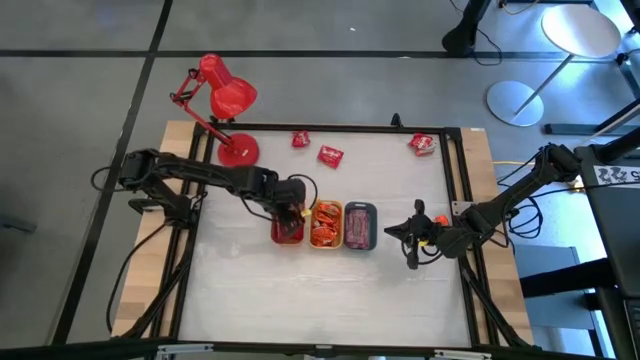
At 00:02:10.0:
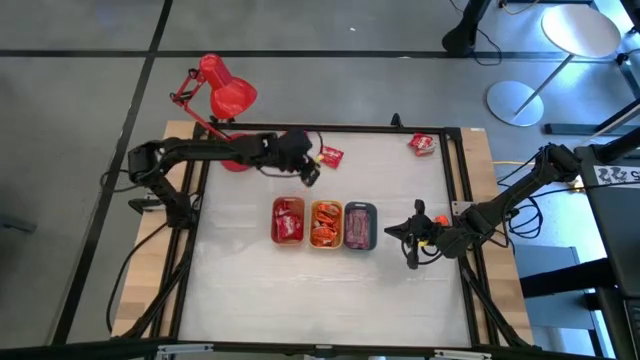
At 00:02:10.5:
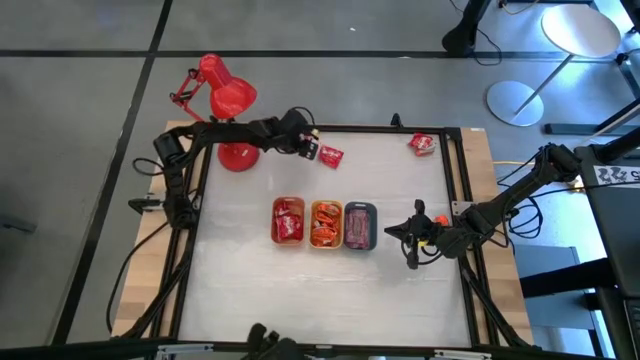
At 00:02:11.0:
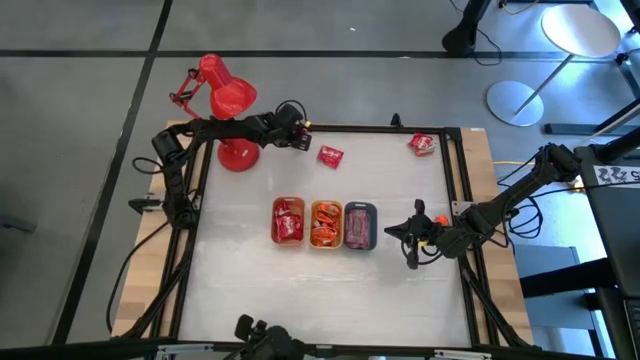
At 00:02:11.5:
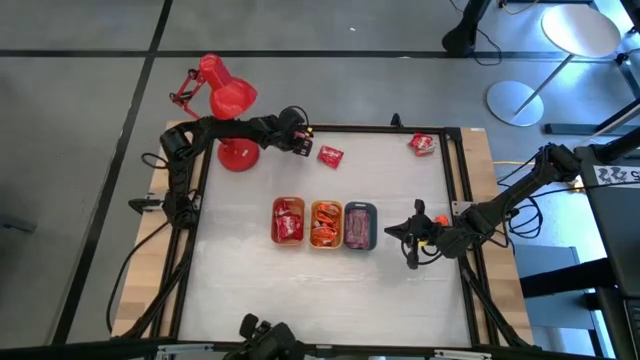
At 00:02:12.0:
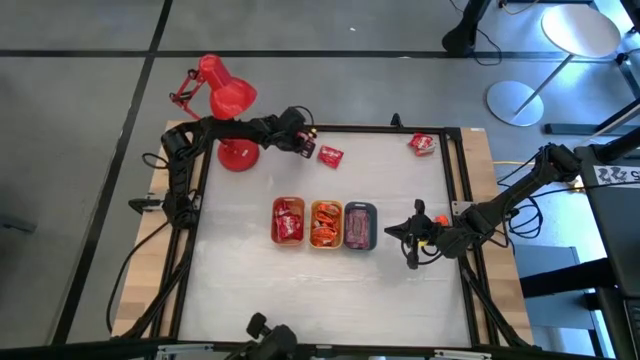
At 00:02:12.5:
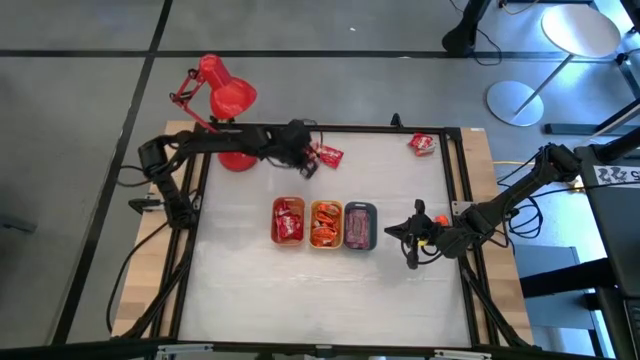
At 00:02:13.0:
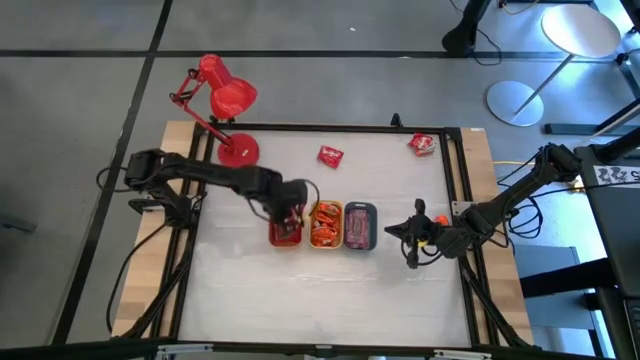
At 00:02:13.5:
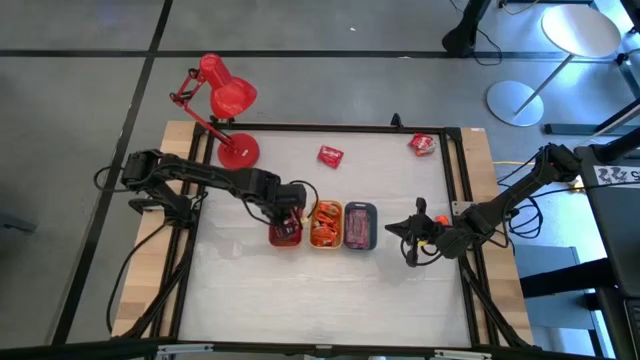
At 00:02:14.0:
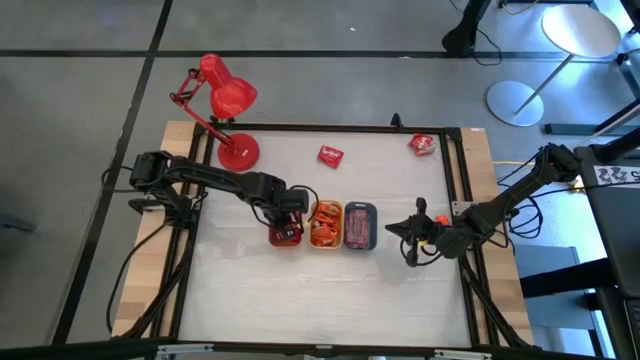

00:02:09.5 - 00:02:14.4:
Task: Sort candy
Put the red candy into the orange bin

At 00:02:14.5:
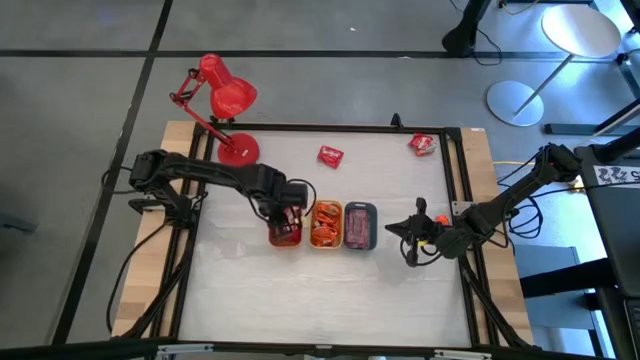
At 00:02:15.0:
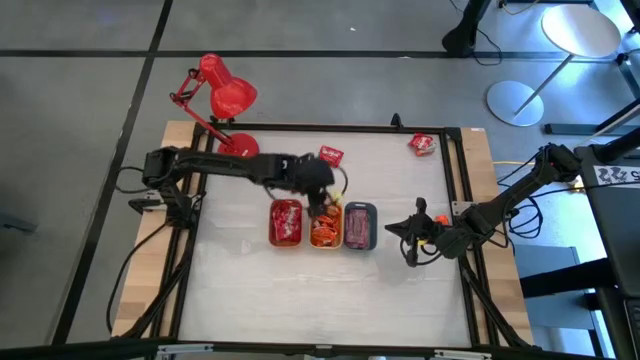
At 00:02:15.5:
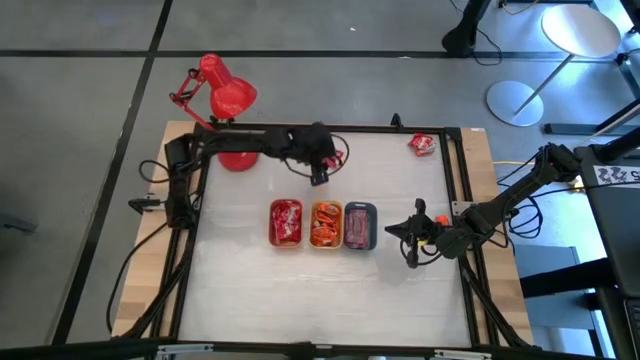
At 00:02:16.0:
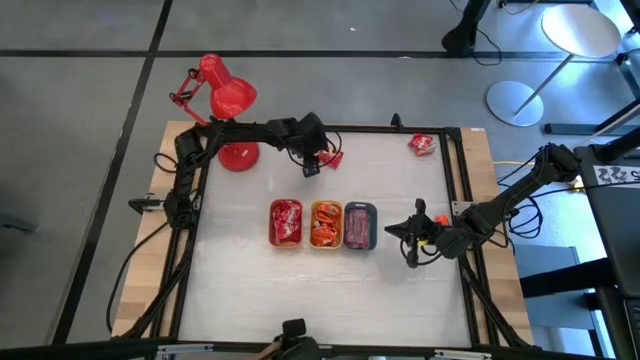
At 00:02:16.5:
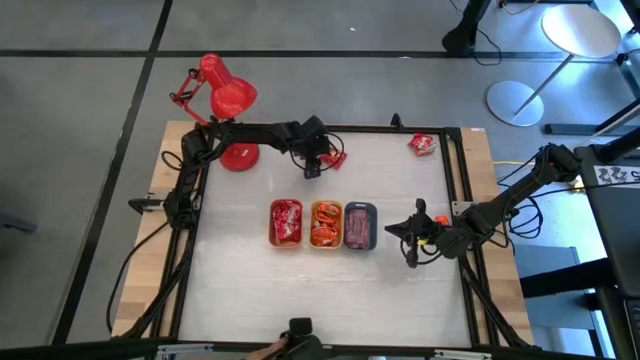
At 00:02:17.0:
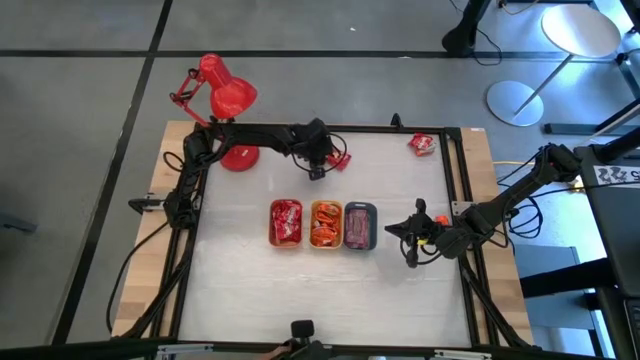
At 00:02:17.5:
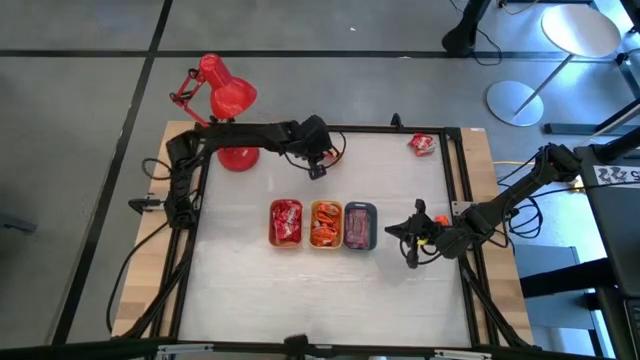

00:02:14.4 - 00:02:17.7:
Put the red candy into the orange bin

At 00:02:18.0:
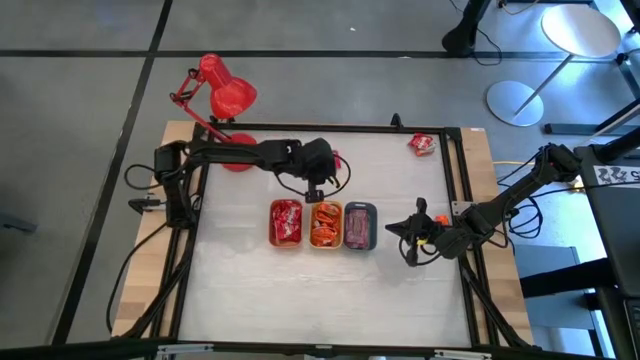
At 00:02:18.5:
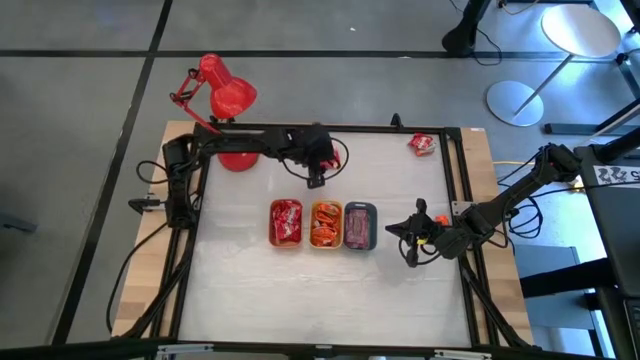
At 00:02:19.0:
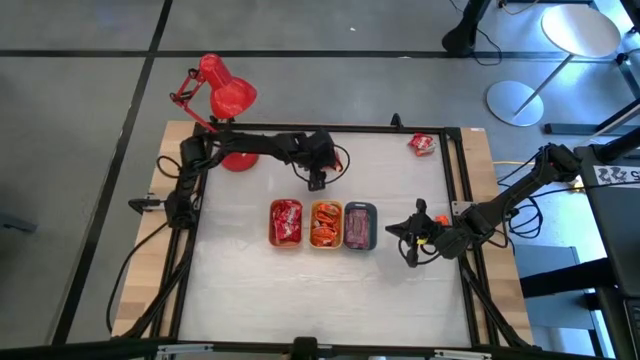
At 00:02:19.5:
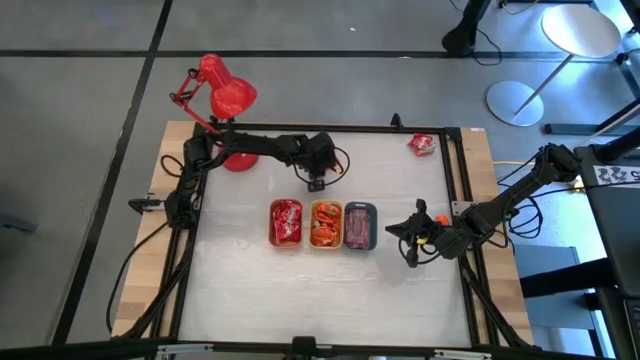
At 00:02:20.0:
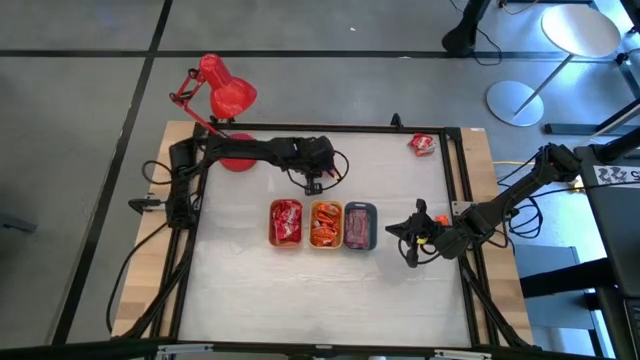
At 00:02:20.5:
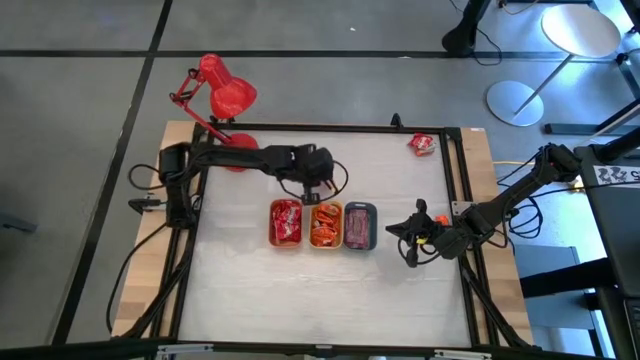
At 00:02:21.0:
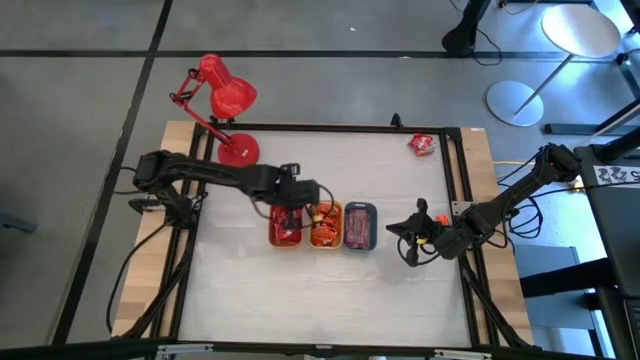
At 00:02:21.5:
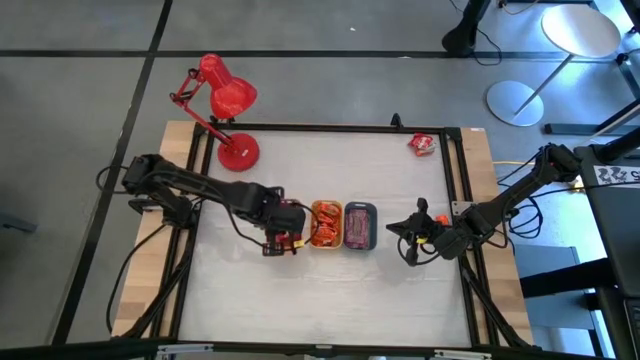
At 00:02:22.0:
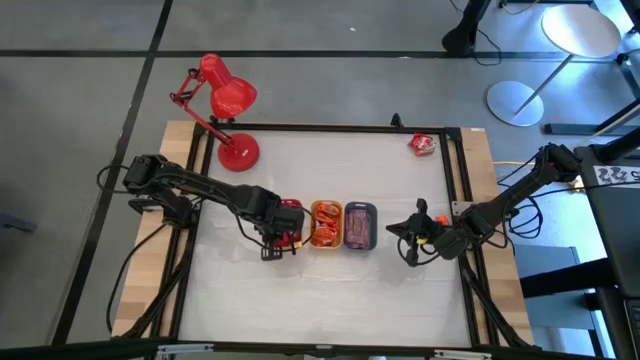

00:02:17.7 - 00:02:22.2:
Put the red candy into the orange bin

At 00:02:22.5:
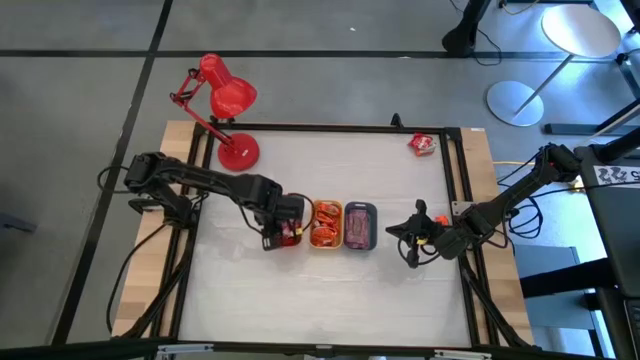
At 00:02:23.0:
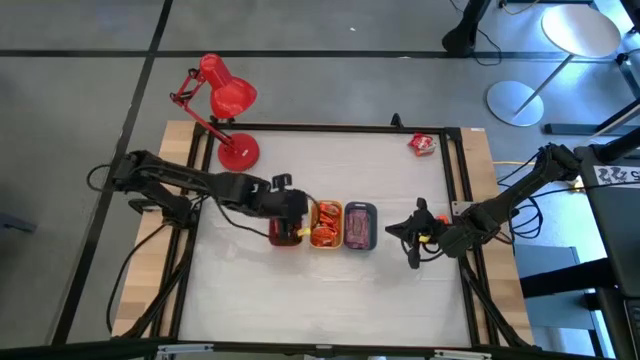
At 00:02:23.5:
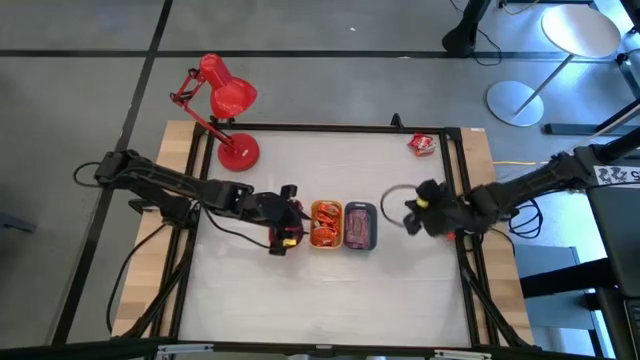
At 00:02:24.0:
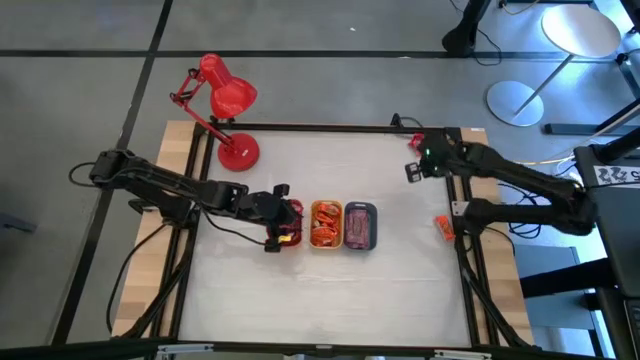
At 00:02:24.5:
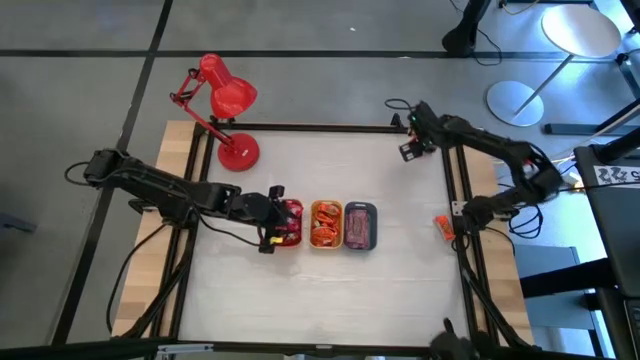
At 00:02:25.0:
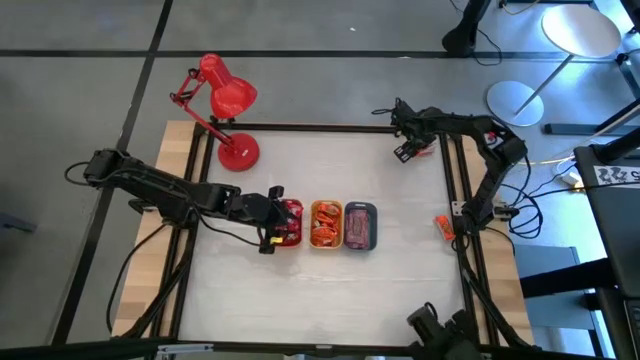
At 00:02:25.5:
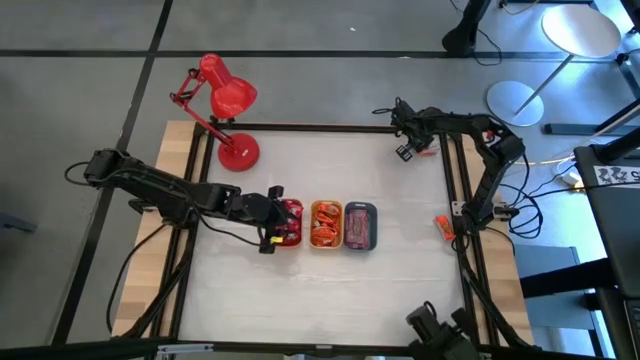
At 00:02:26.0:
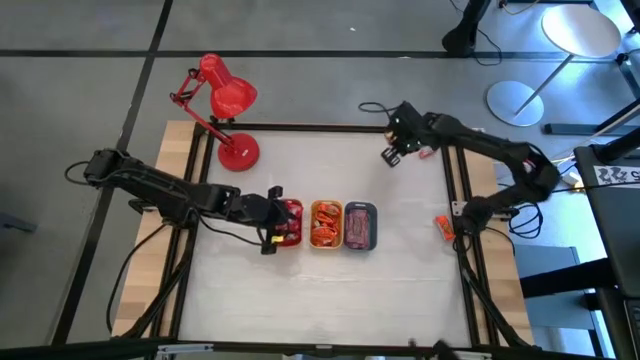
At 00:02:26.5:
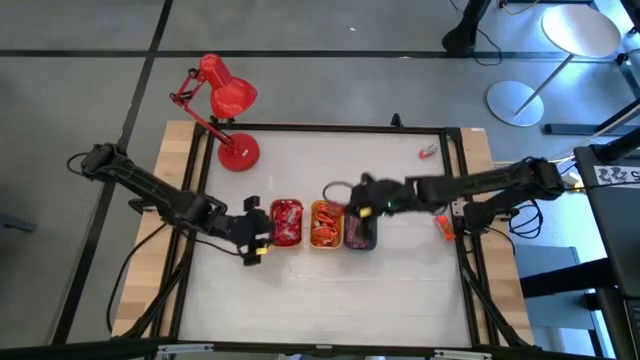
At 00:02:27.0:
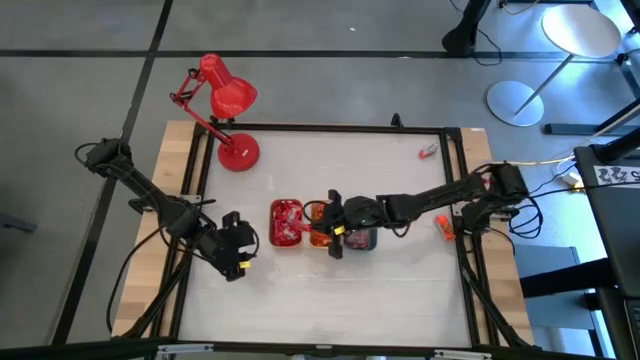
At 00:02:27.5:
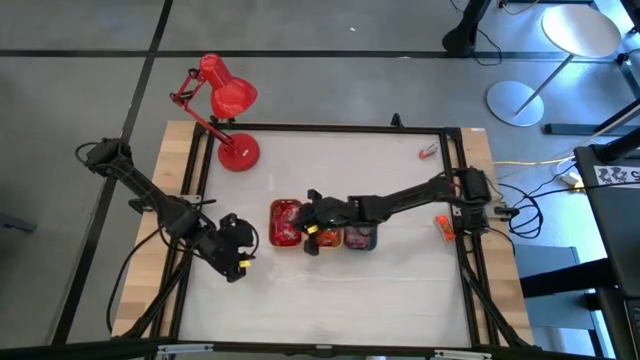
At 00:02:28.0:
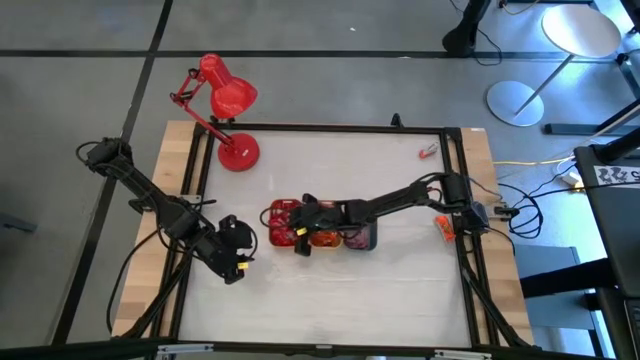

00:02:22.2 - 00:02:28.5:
Put the red candy into the orange bin

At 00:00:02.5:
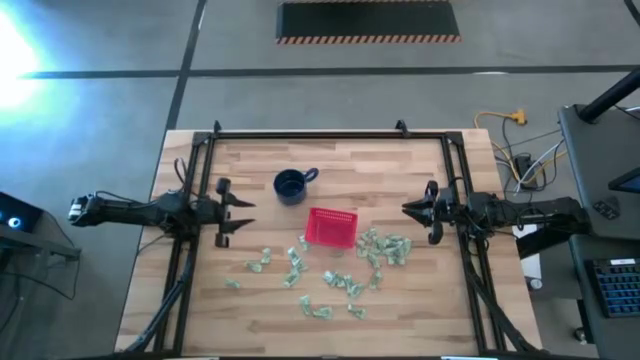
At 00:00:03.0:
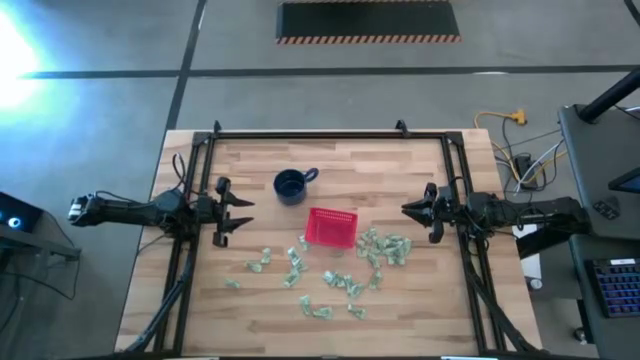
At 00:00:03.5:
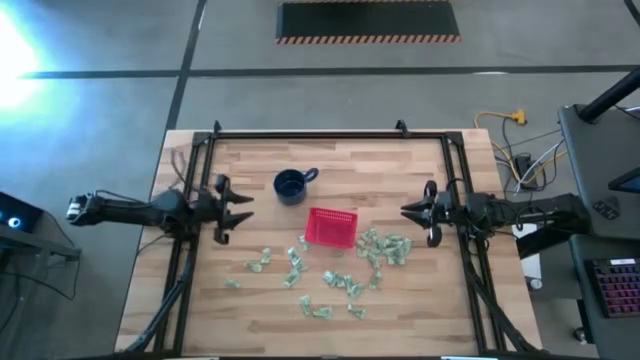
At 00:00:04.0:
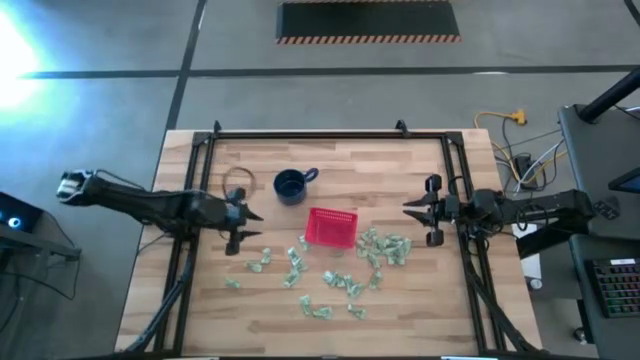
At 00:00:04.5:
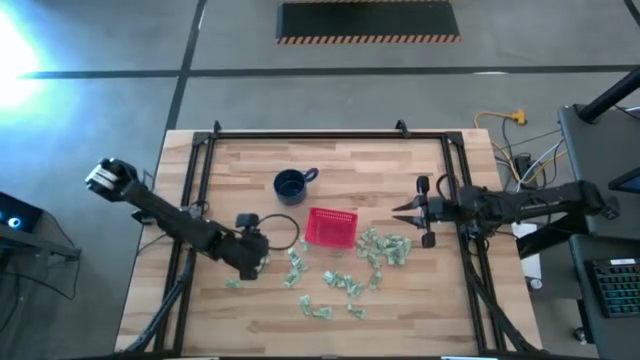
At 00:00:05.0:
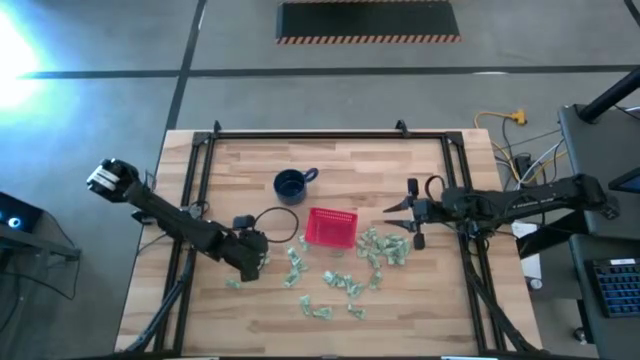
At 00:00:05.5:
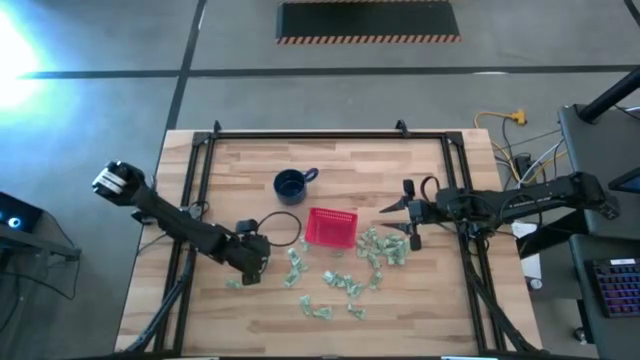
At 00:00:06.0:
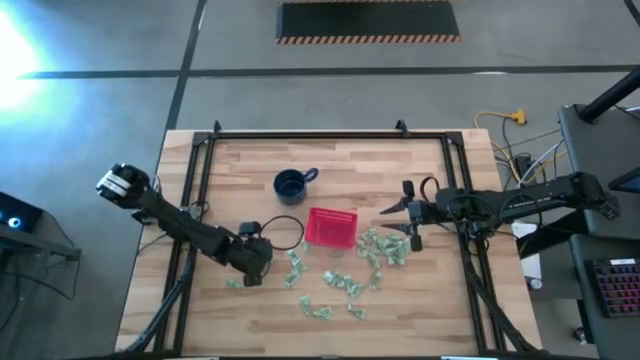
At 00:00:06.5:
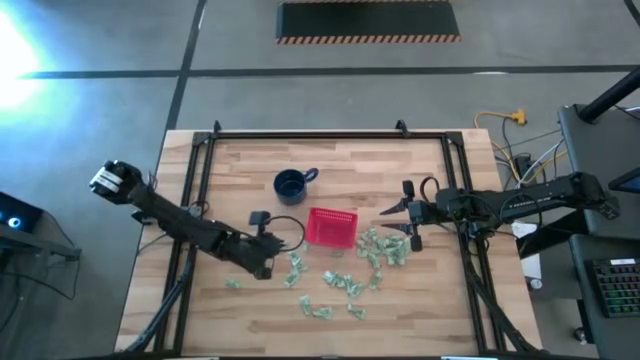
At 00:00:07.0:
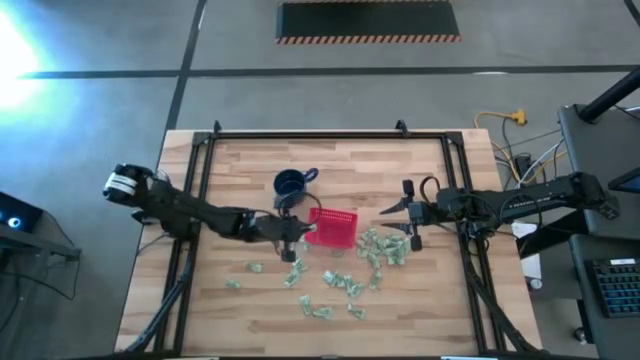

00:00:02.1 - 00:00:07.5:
Task: Pick and place Stevia / Truvia into bins
Put the white stevia packet into the red basket
